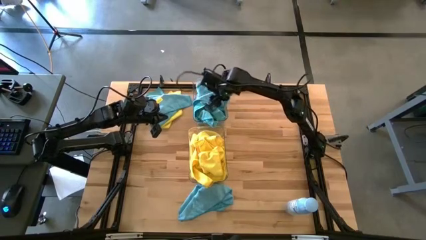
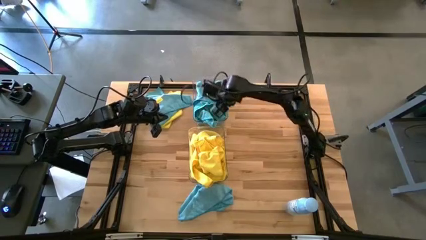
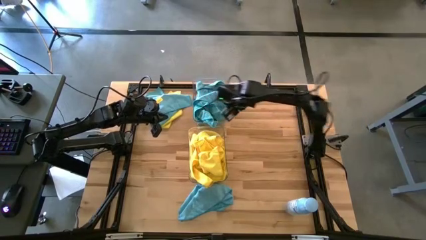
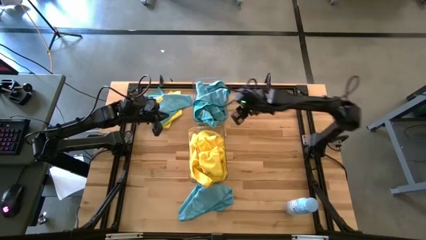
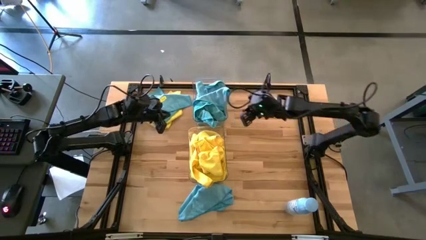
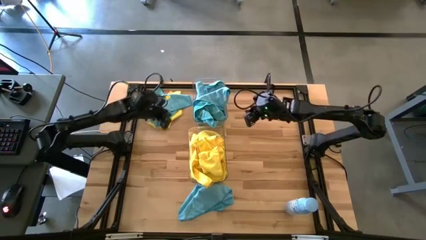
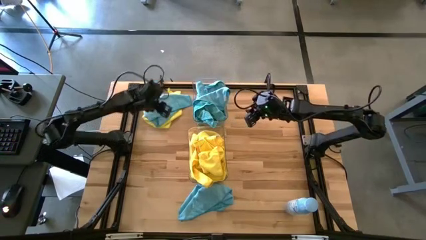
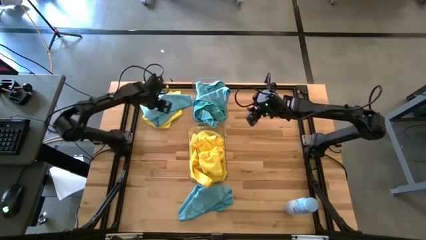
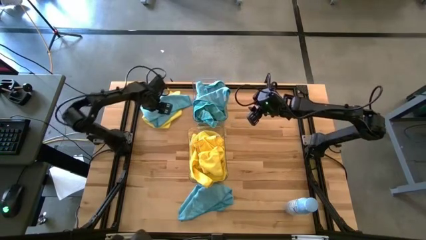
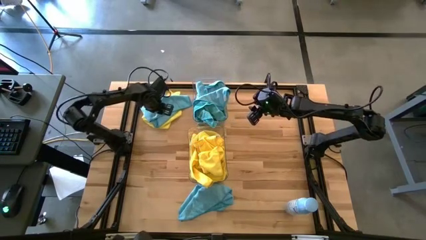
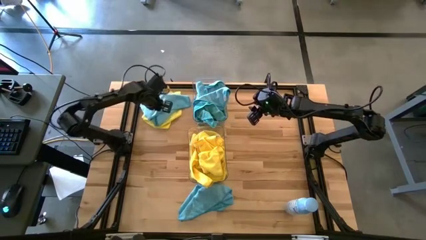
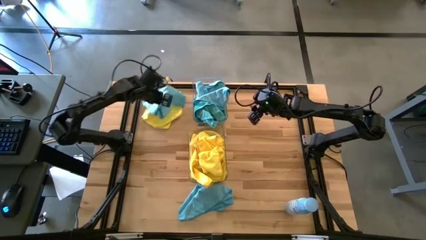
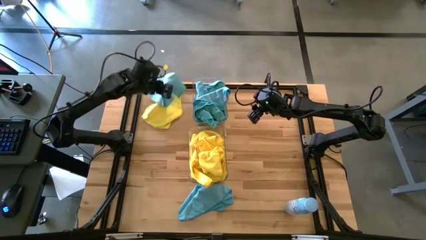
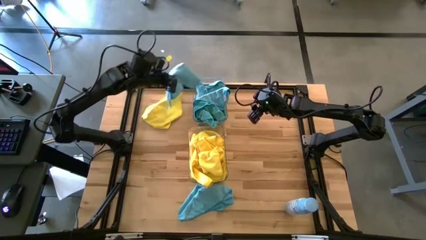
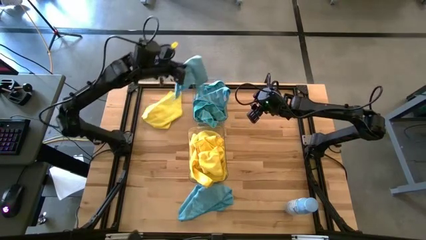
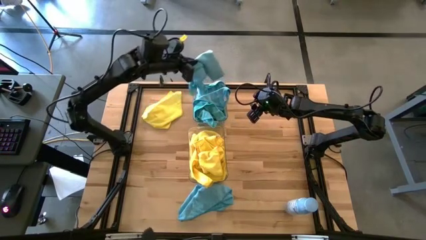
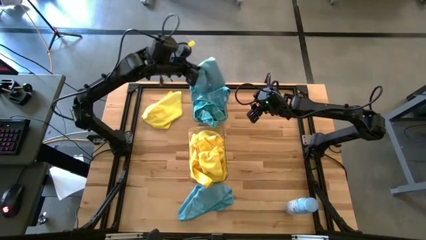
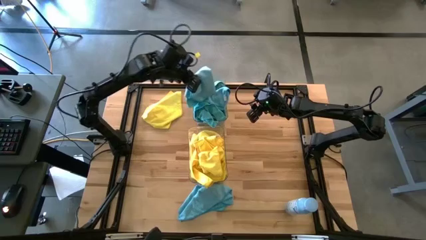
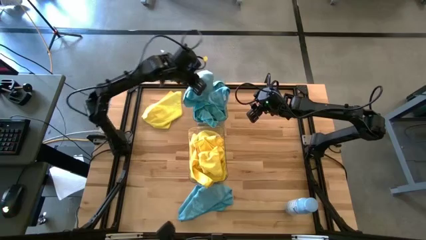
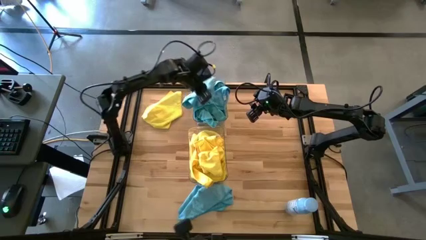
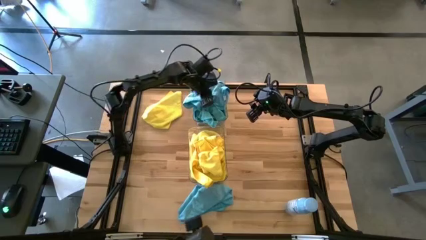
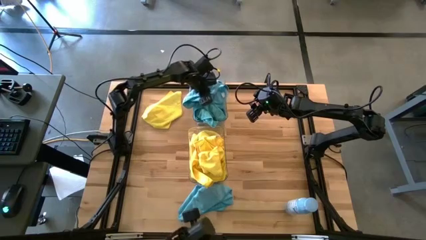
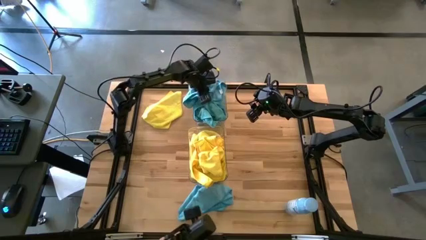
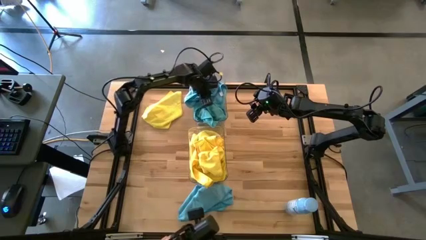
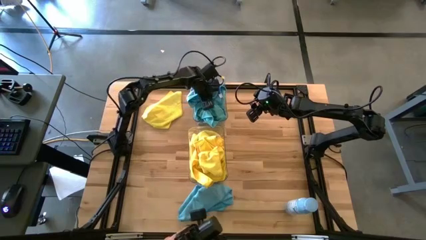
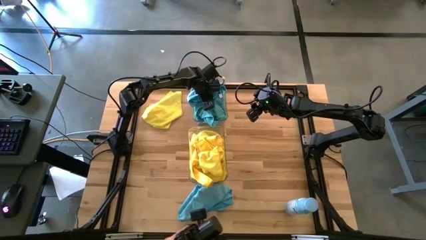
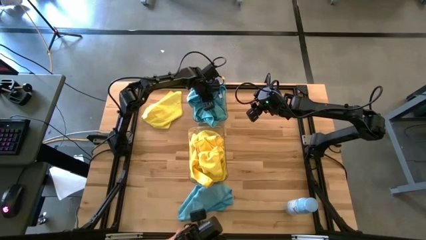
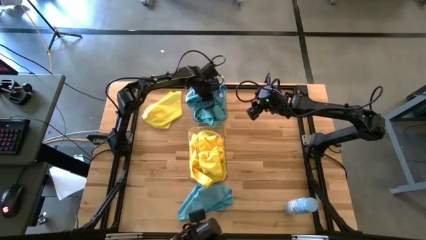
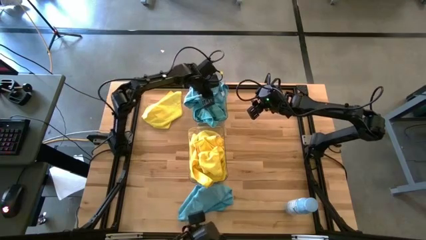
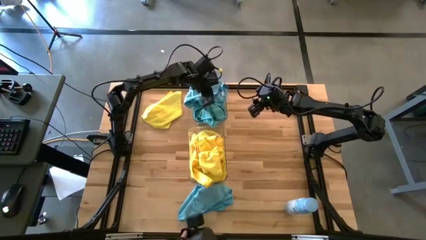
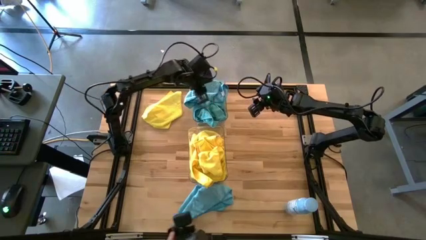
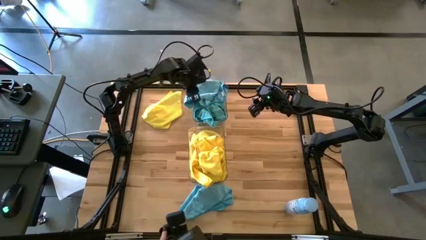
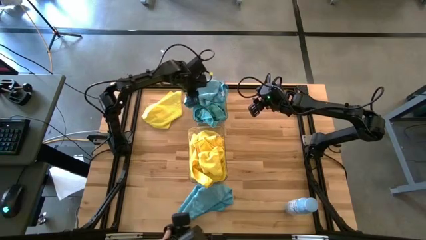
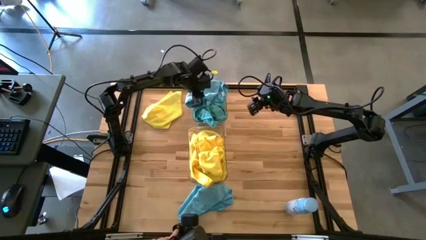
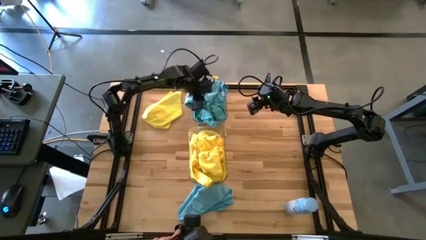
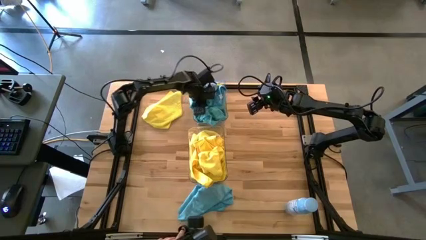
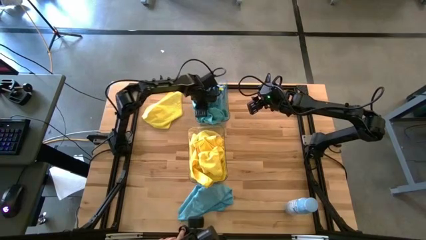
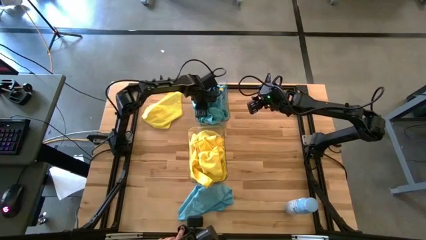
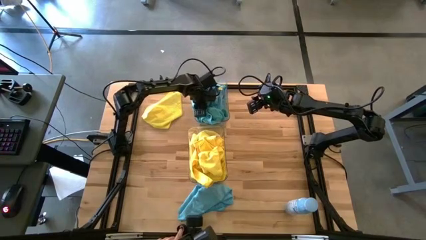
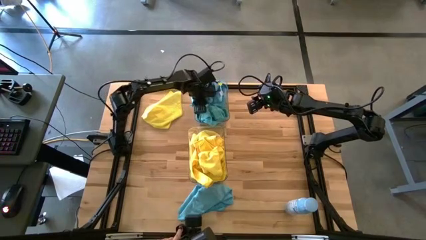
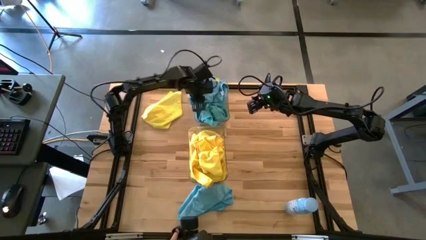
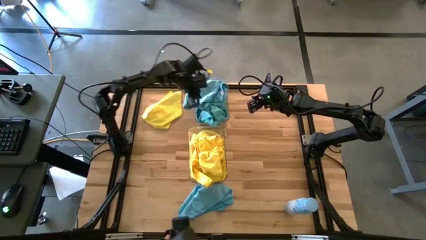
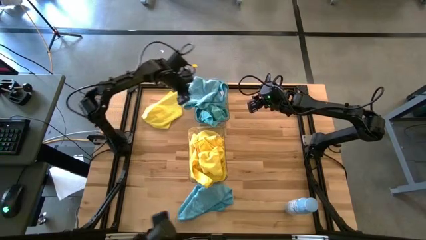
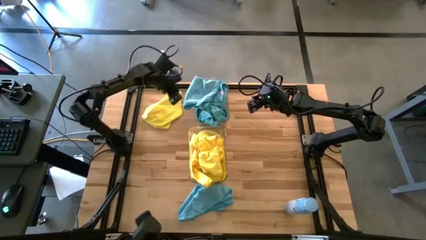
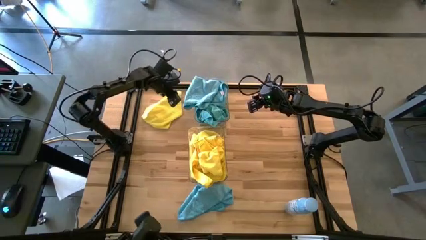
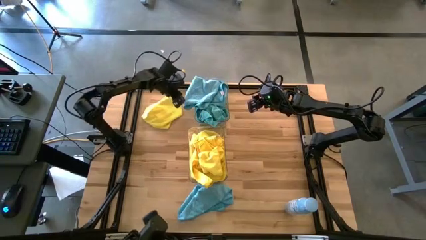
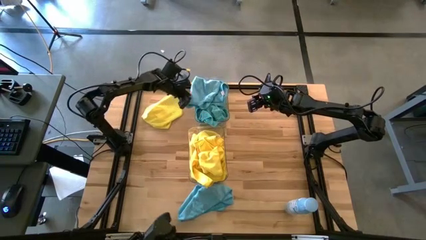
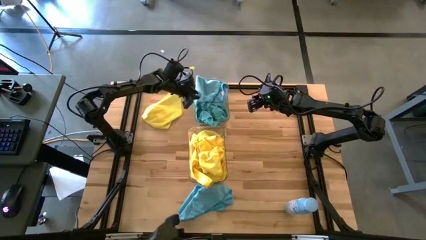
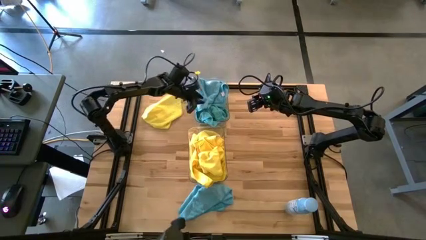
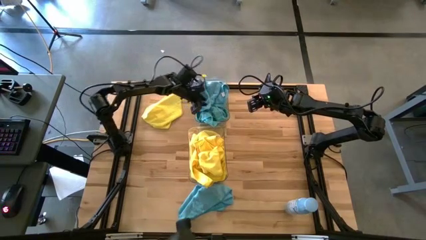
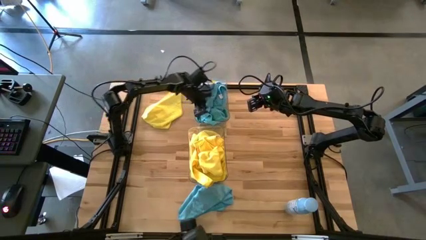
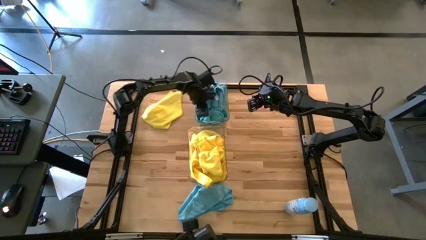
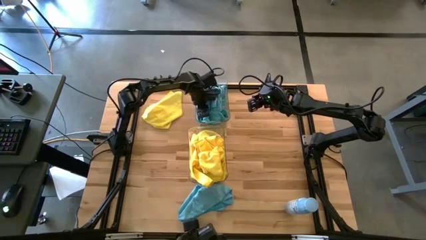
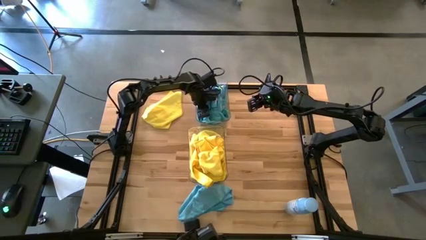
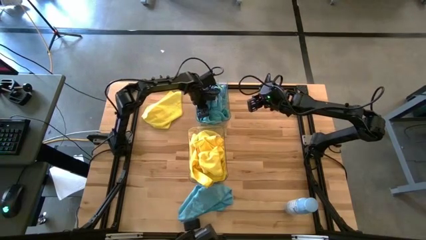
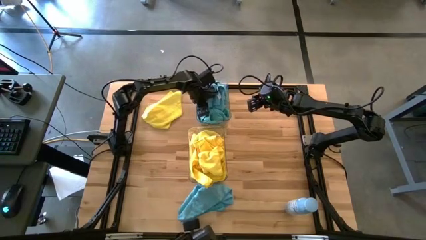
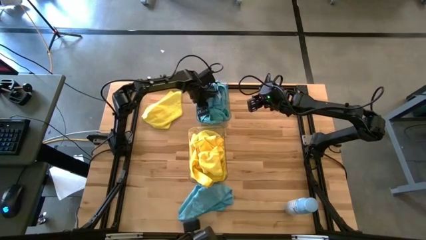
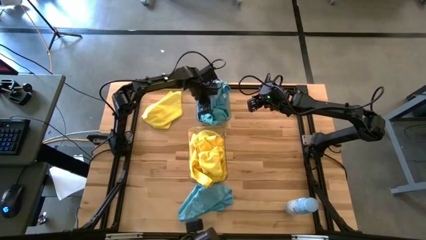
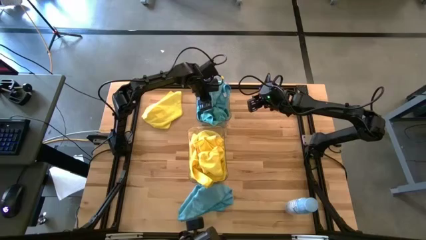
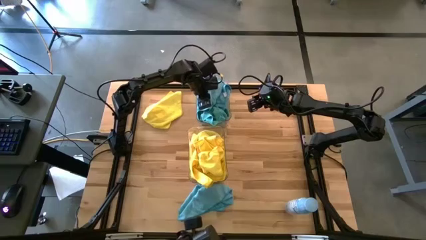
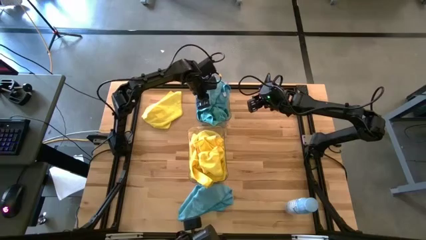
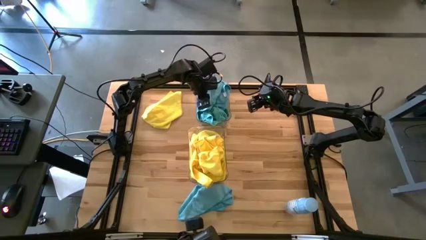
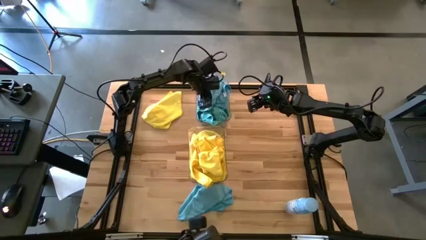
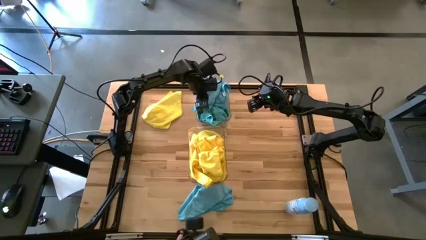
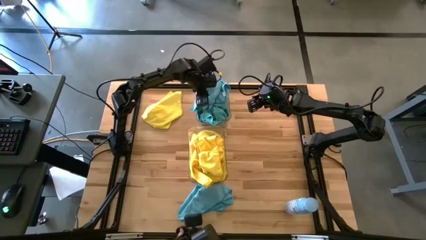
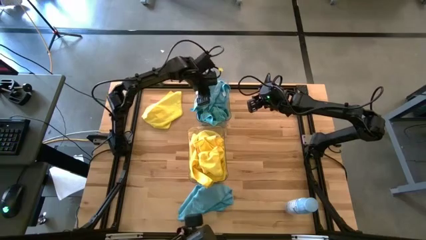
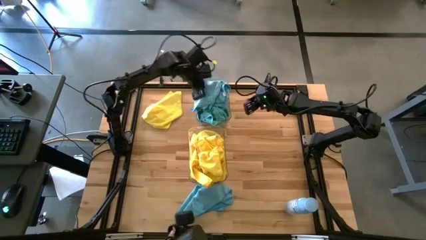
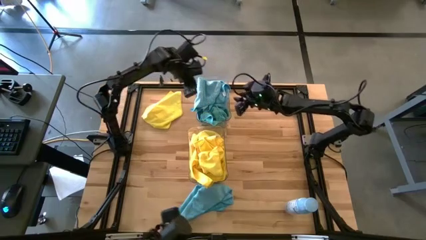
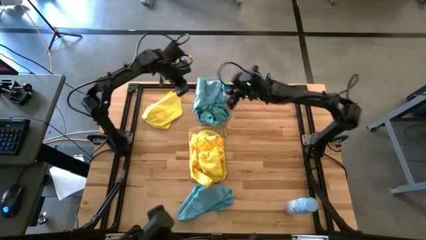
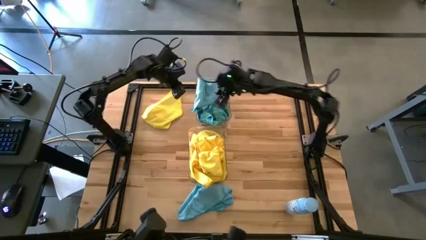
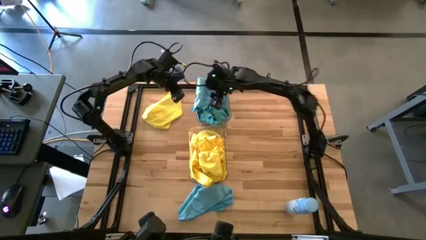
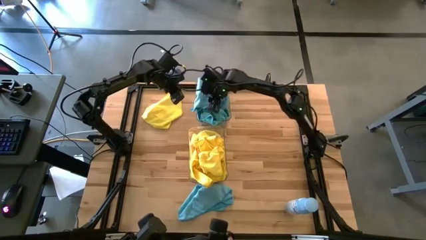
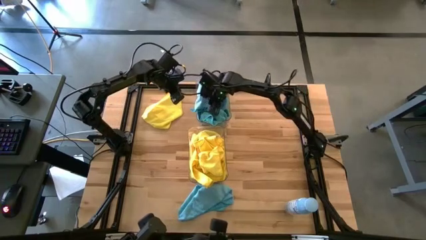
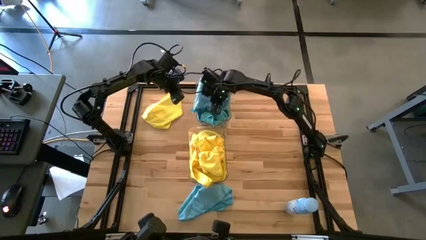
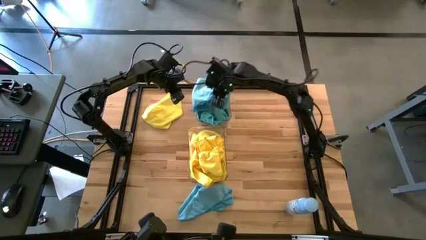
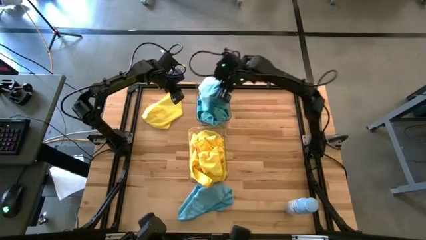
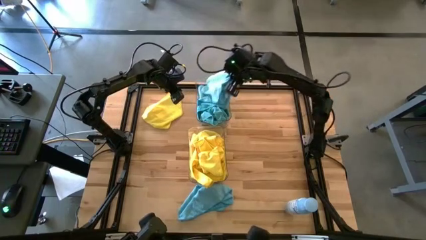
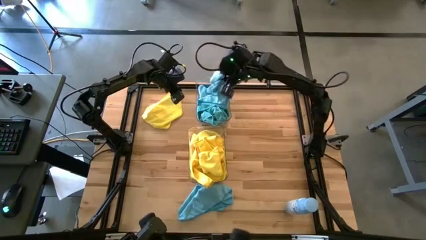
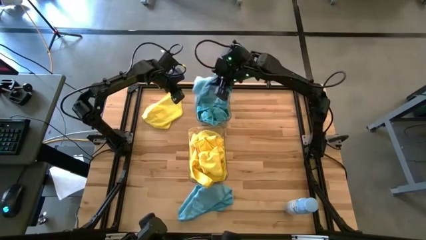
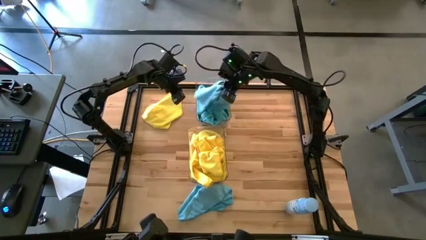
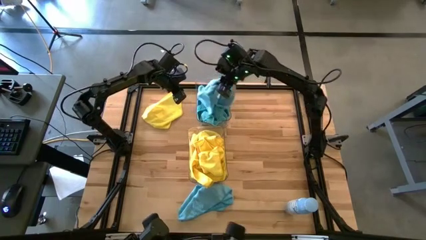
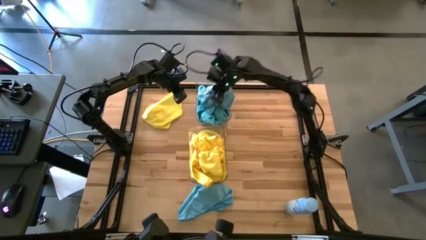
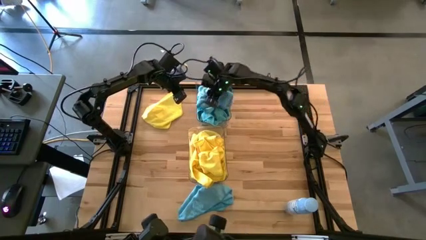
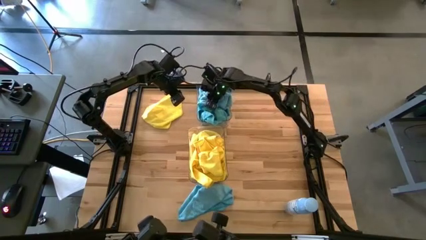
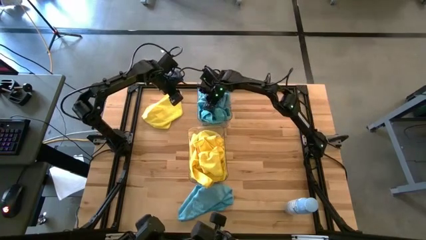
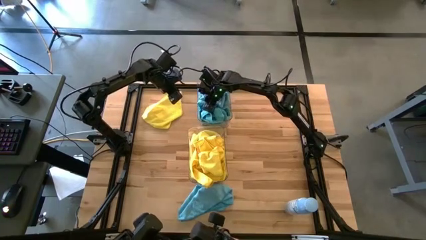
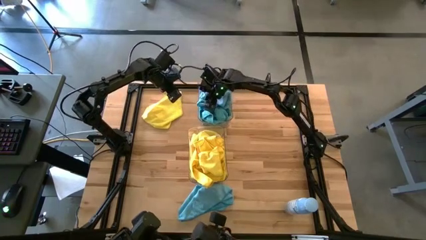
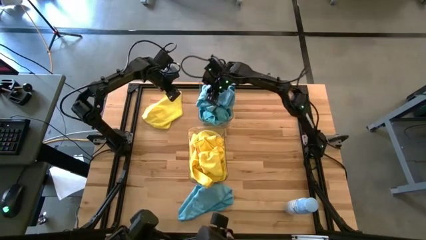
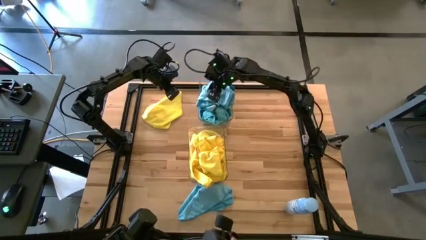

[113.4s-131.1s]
Task: Sort microfiber towel by color & place in baskets
Put the blue towel into the top transparent bin
